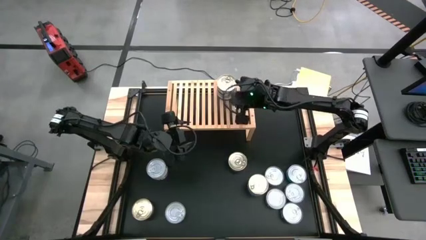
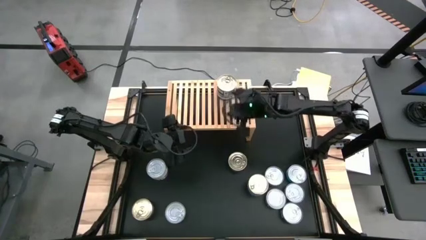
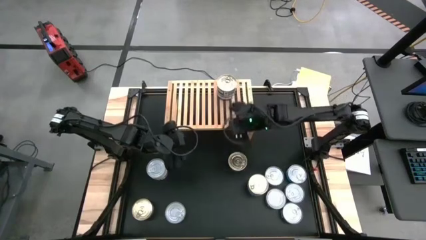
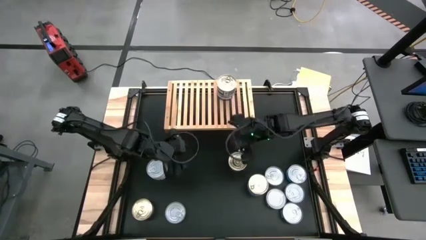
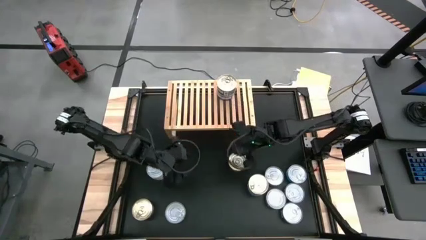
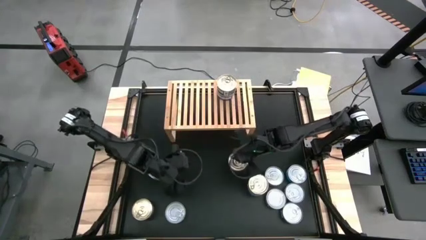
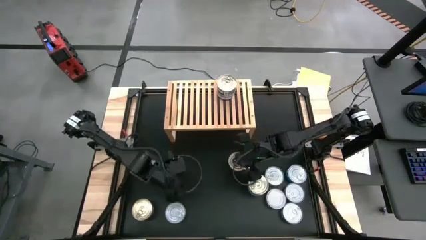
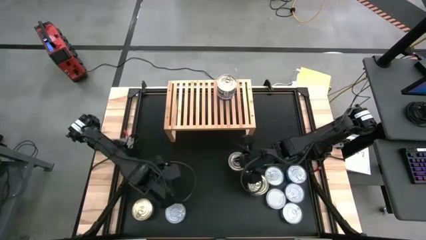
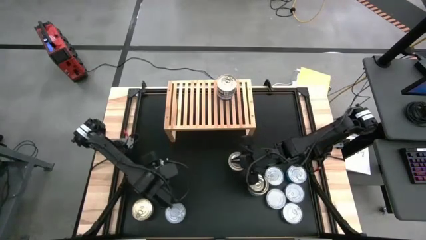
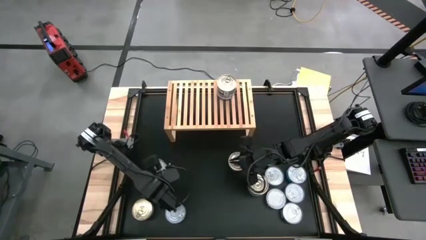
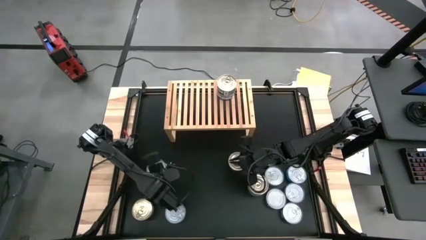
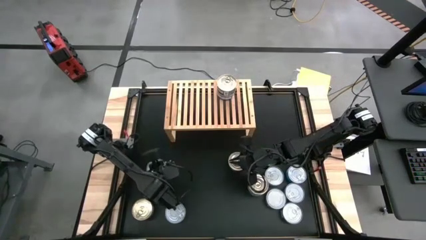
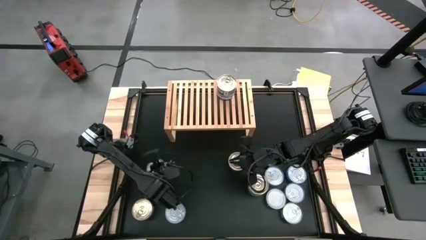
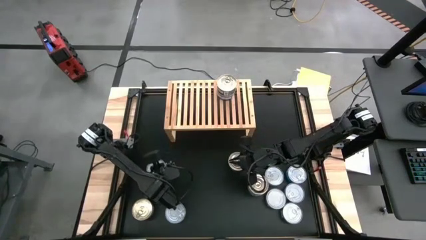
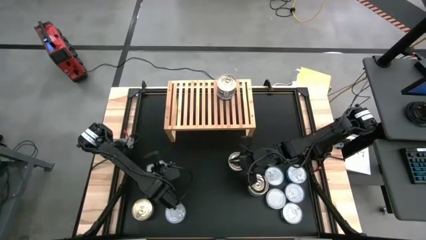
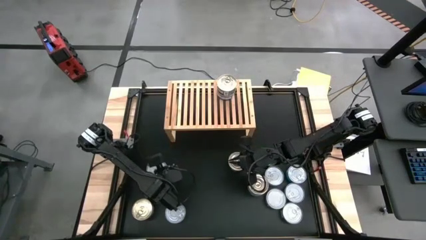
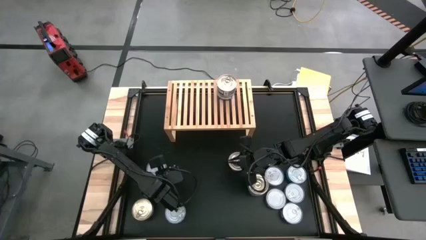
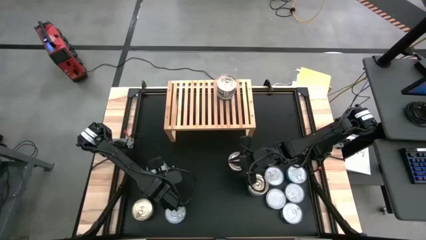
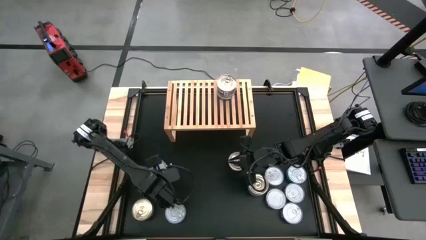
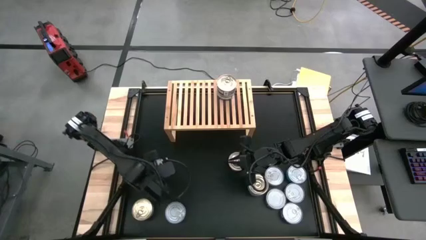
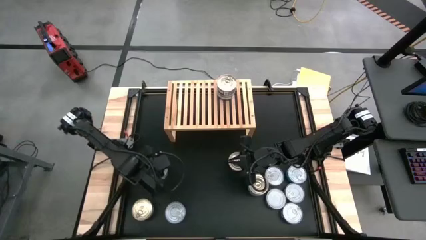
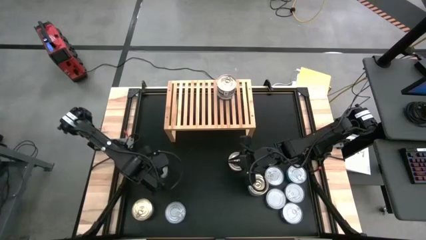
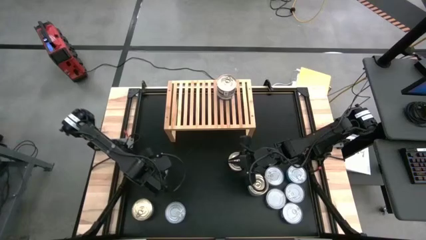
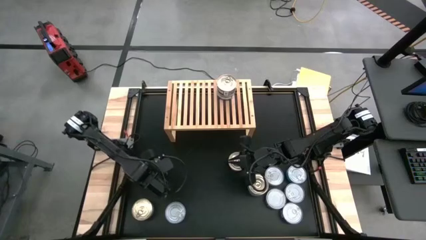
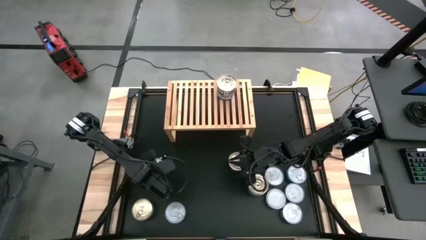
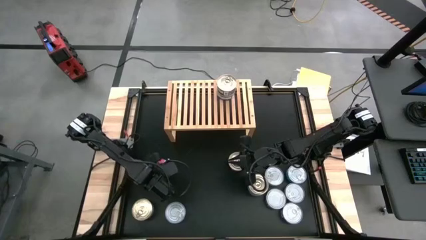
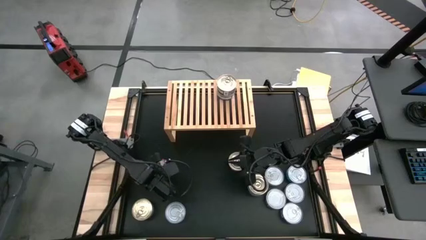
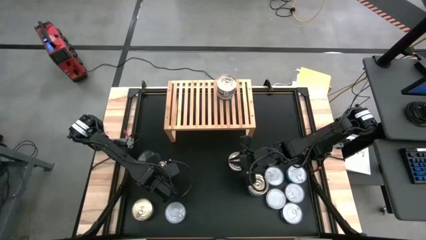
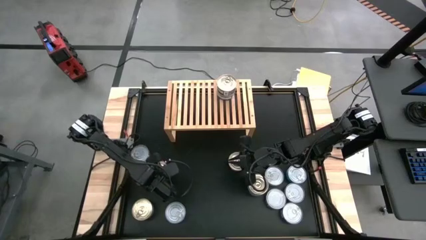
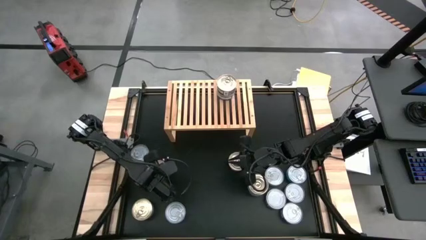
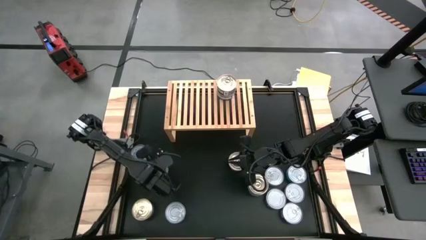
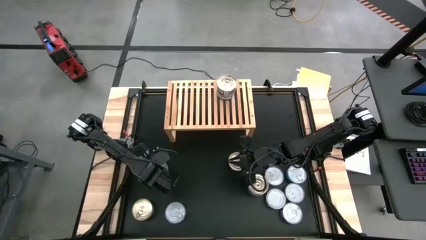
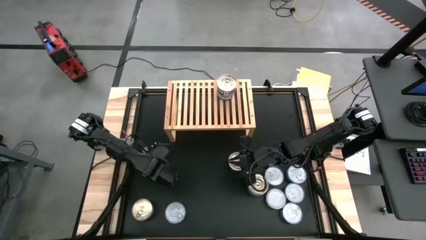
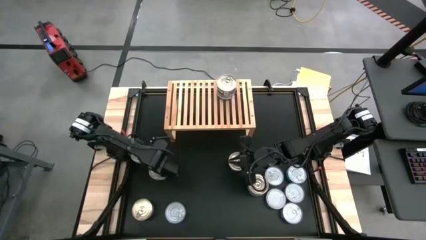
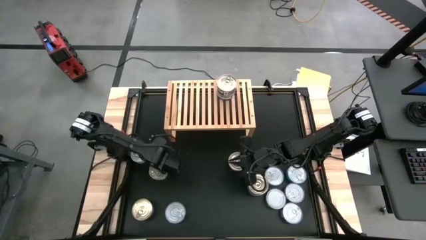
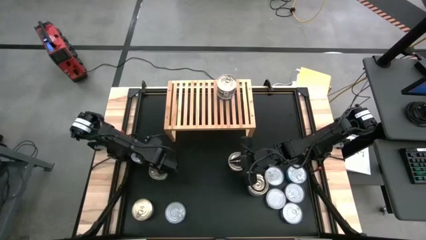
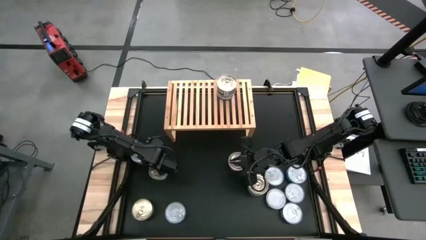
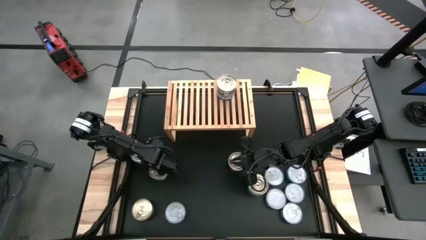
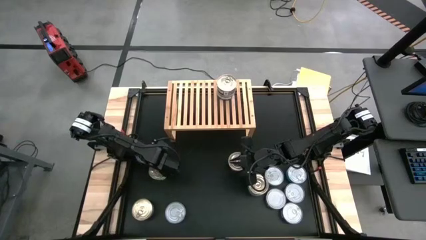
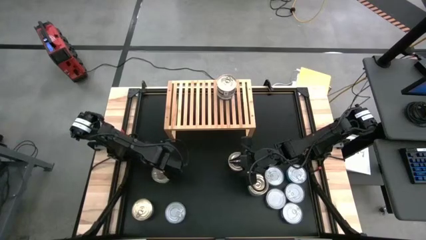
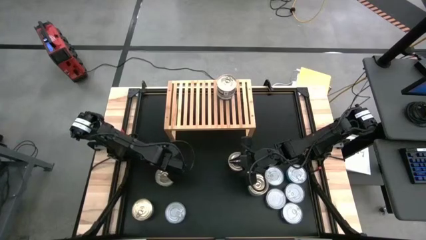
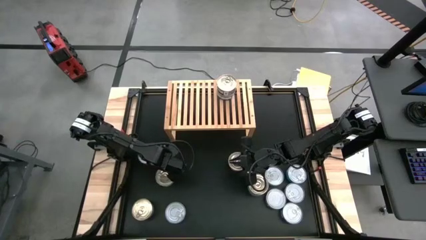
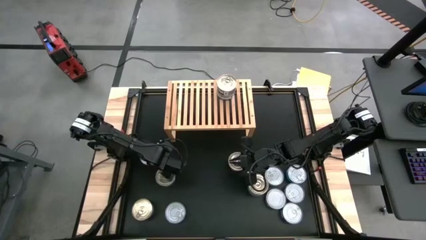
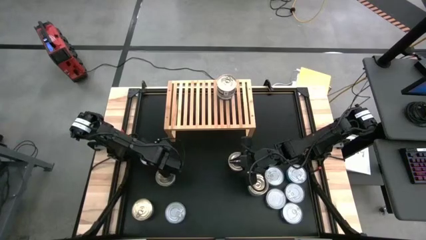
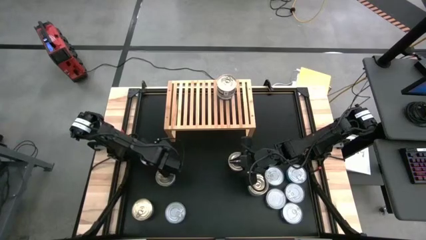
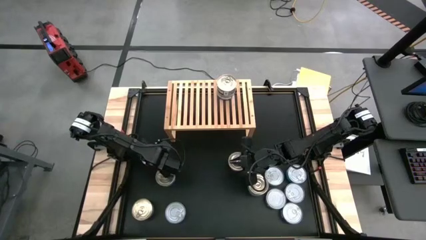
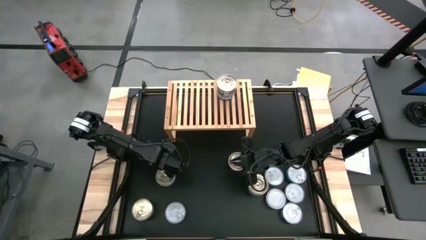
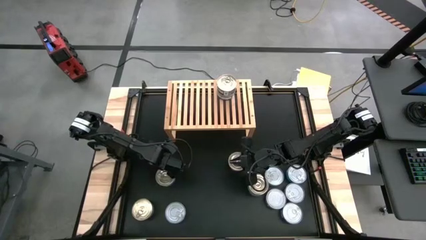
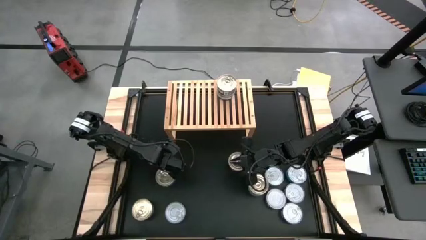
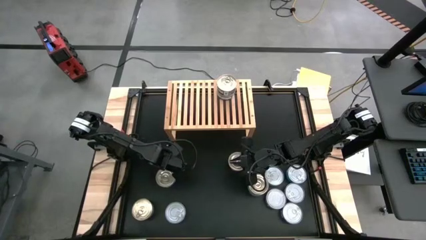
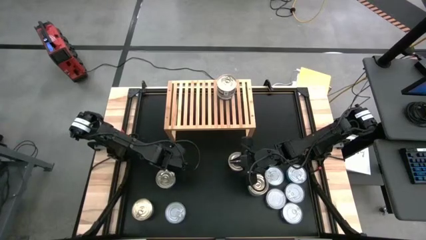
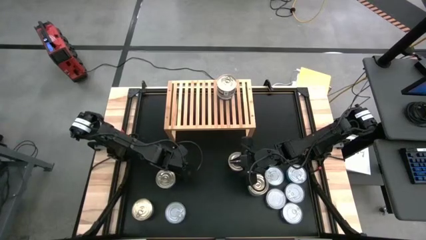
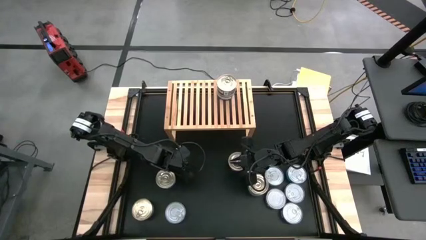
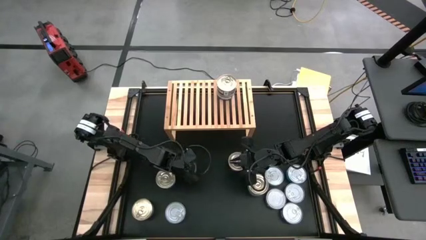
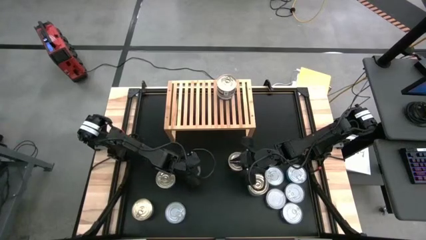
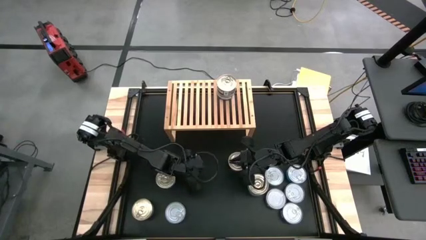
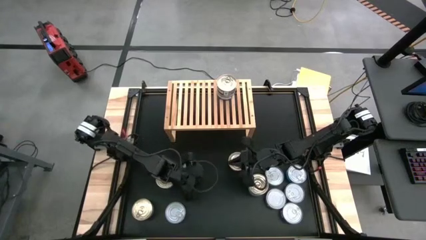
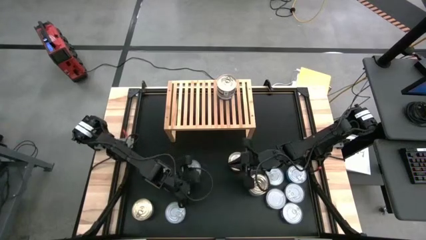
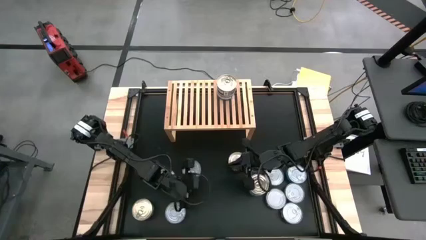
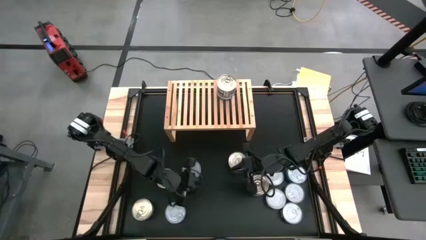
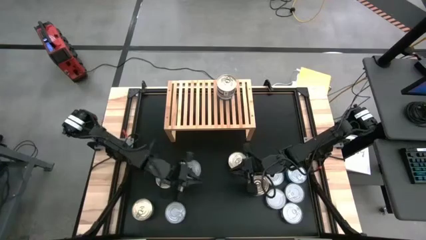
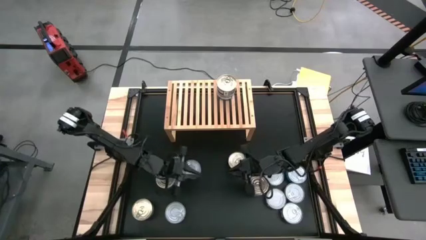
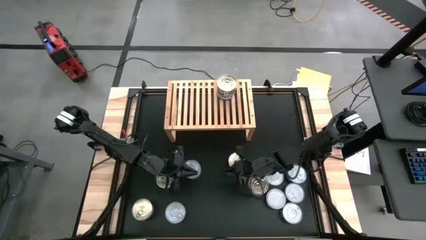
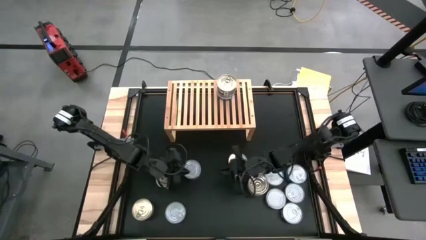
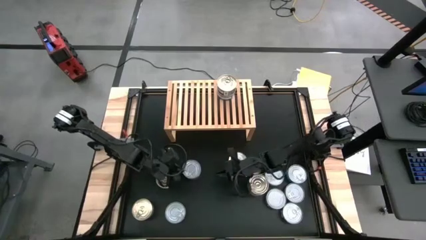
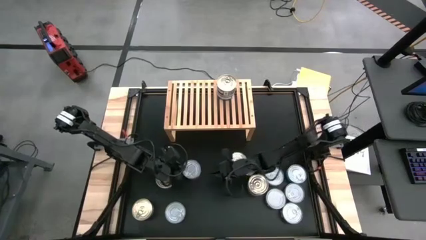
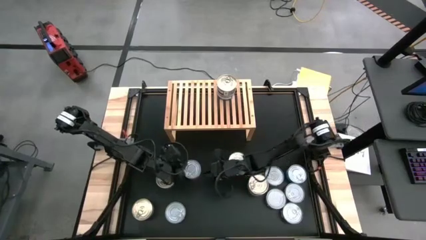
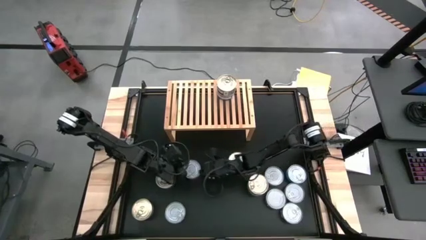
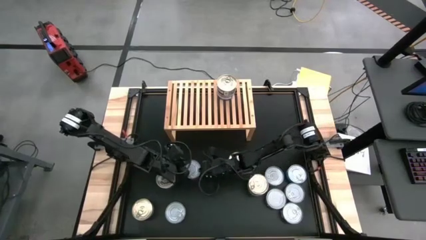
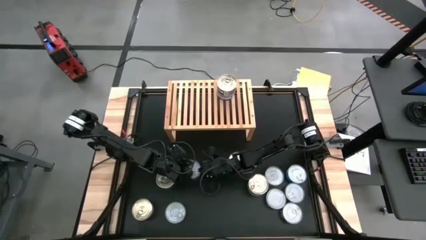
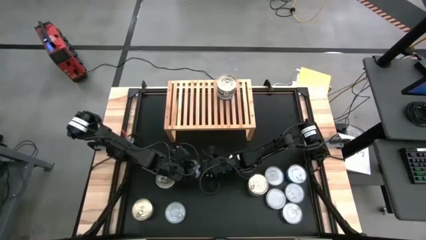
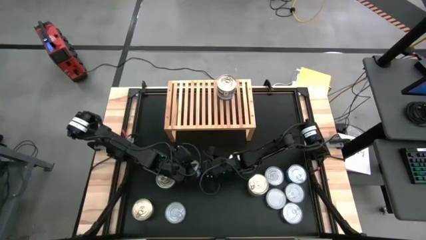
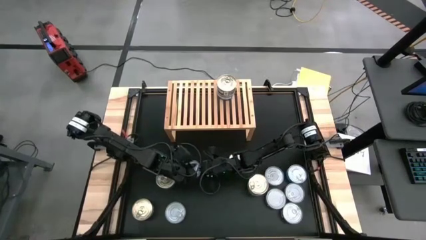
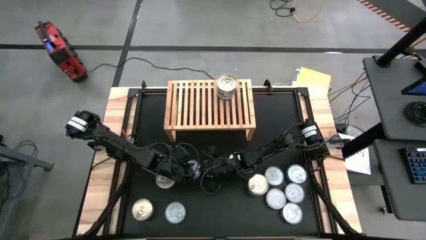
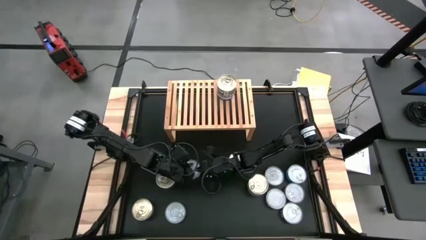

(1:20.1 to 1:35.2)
Task: Stack canned seafood by type on shelf
Put the red tuna can on the shelf

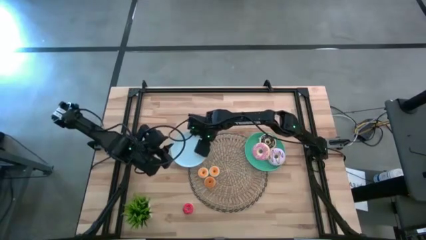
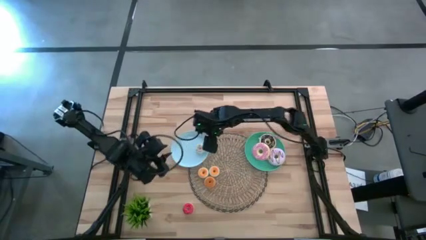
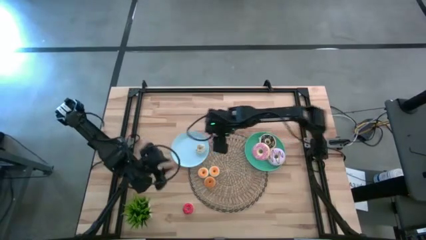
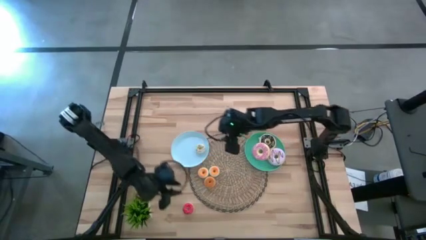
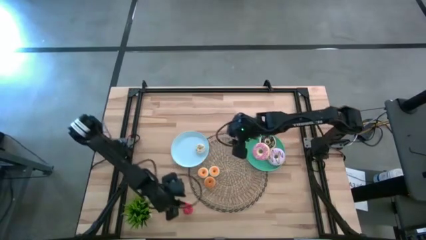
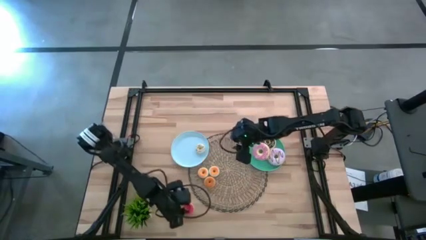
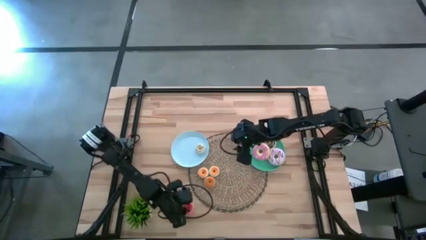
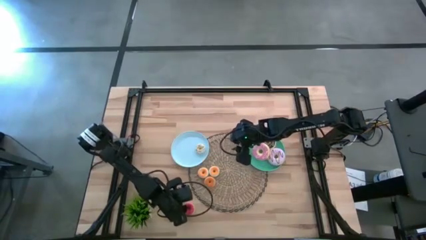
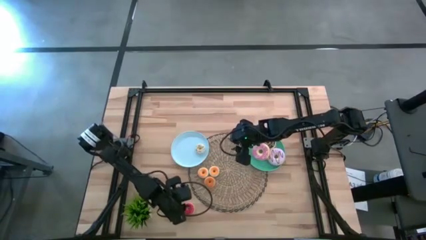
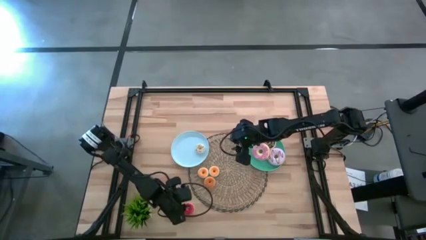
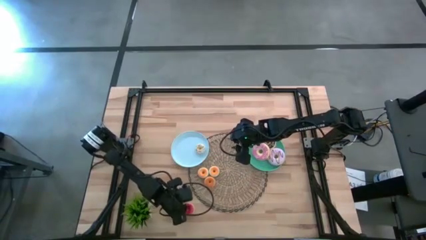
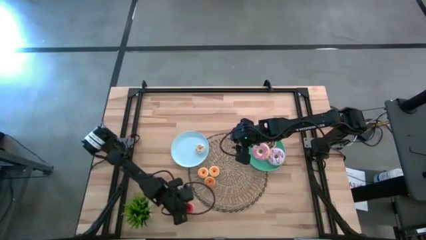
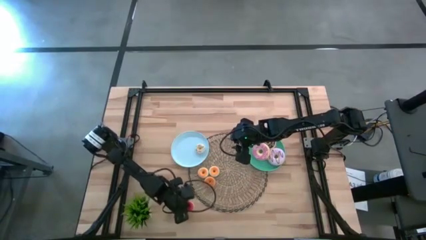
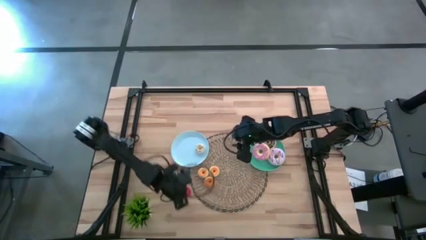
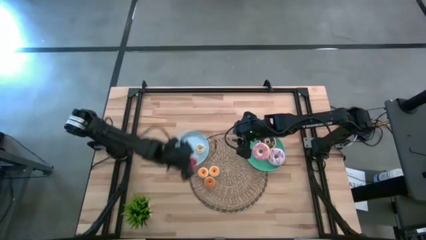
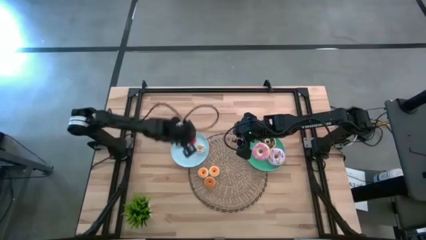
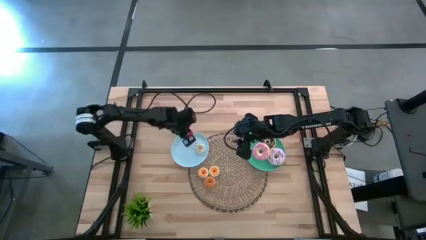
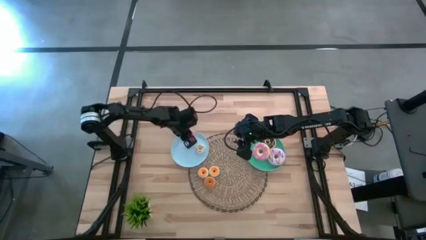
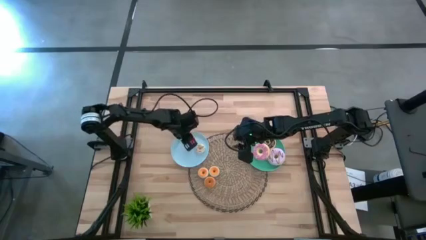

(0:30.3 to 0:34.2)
Task: Pick & Place donuts
Put the small bottom red donut on the blue plate
